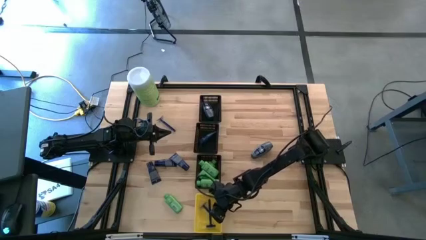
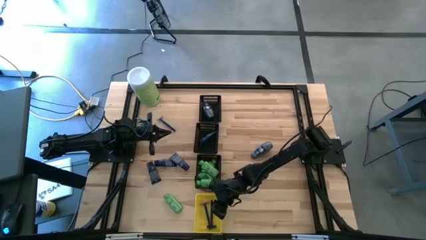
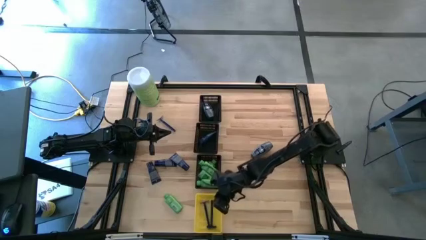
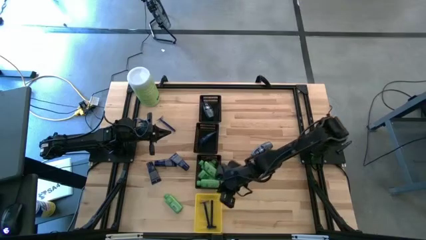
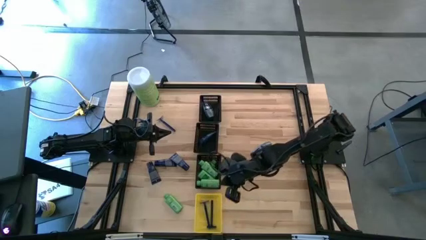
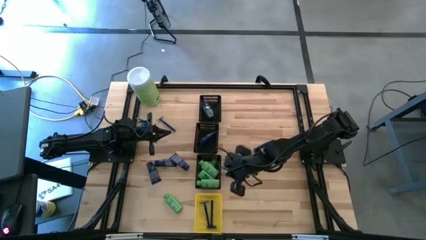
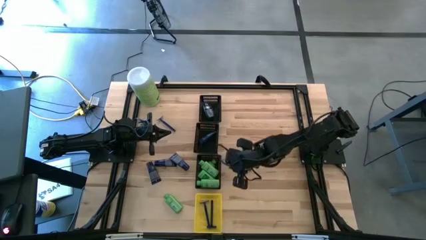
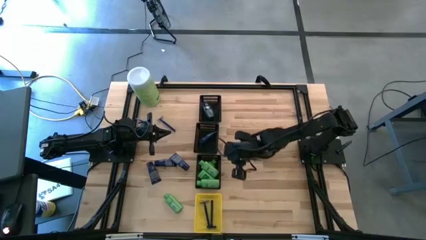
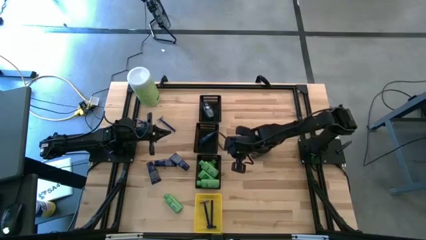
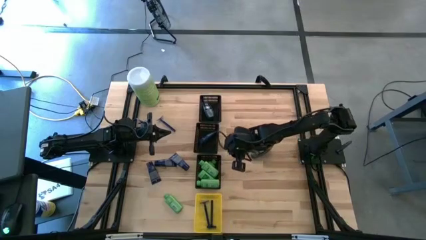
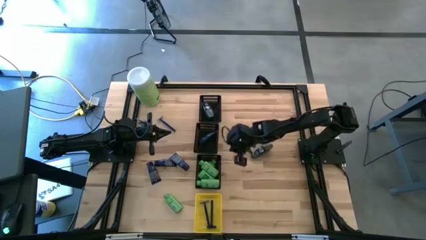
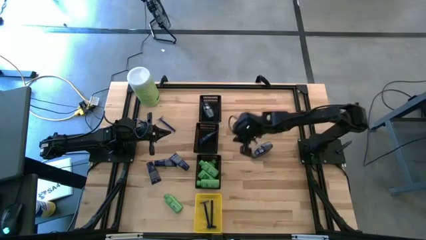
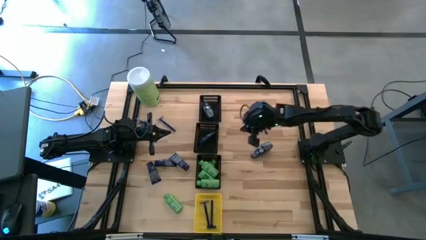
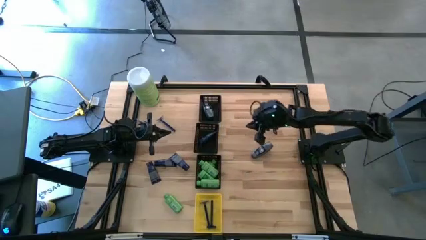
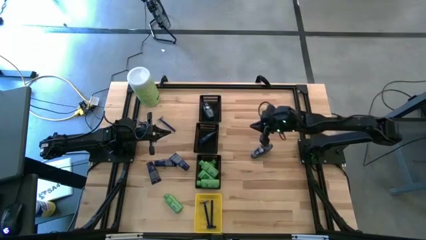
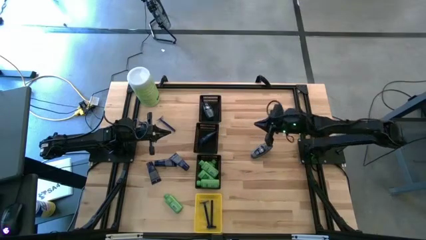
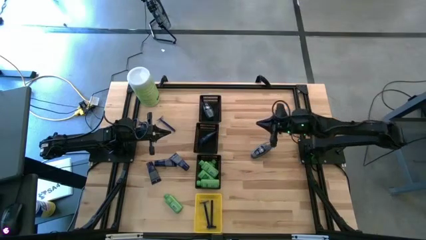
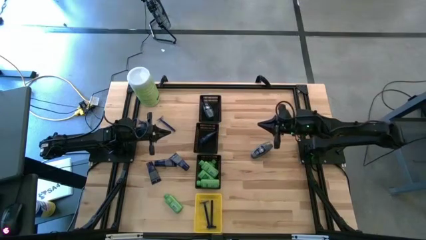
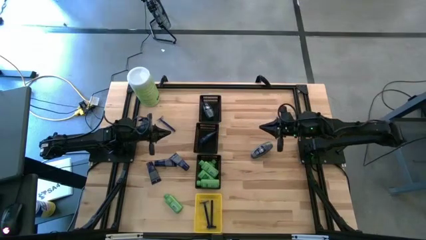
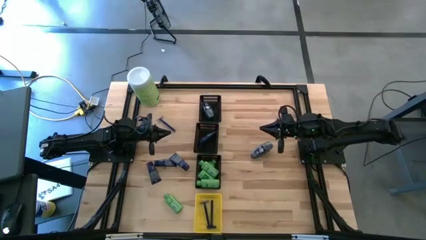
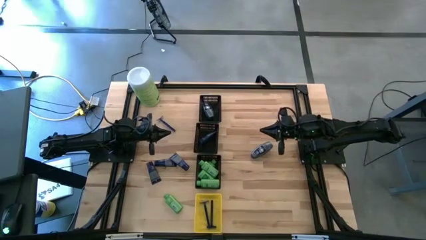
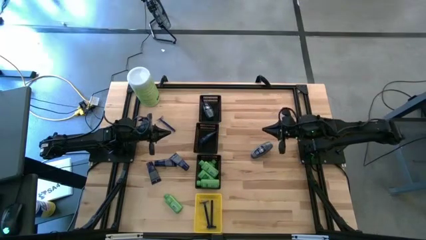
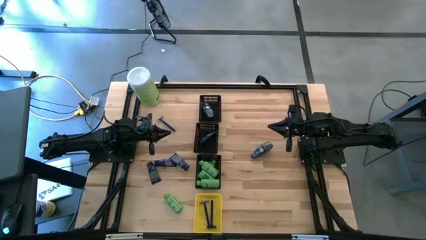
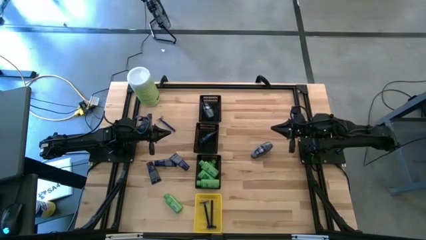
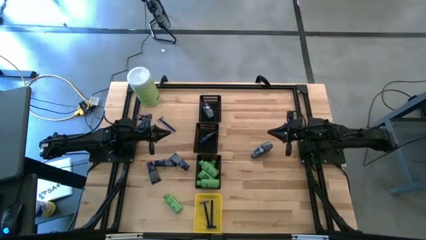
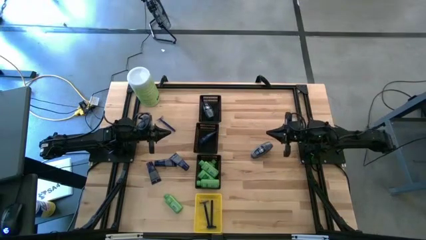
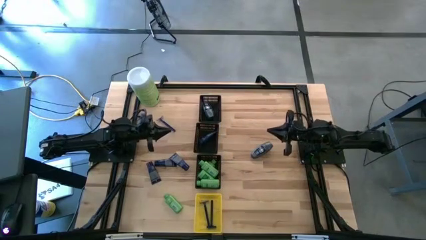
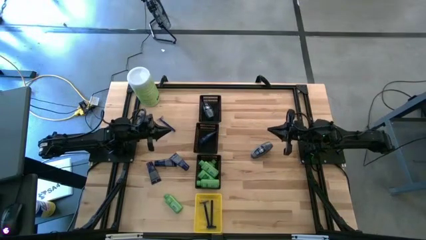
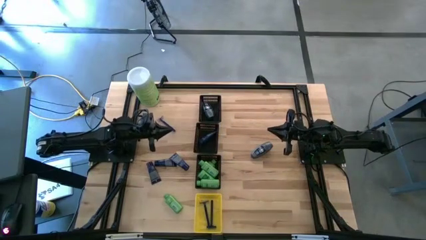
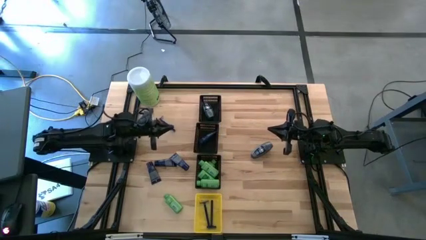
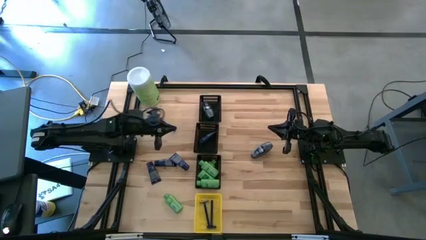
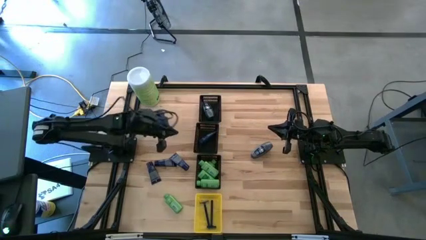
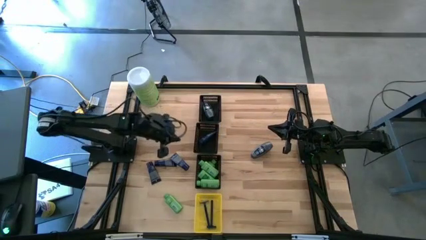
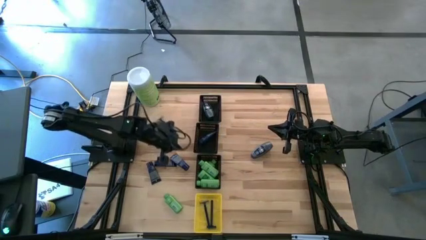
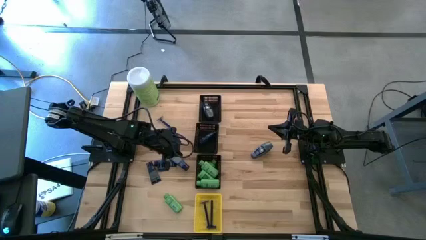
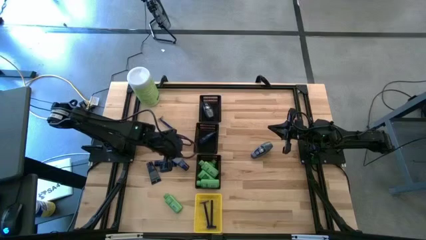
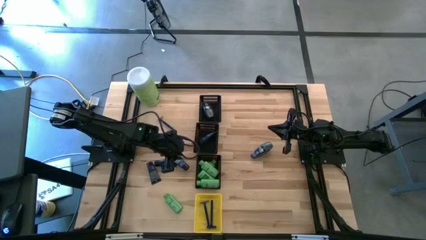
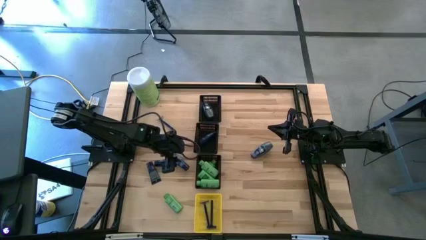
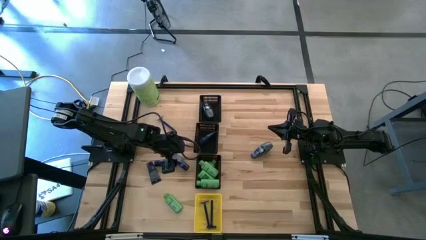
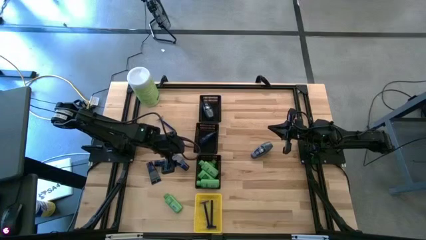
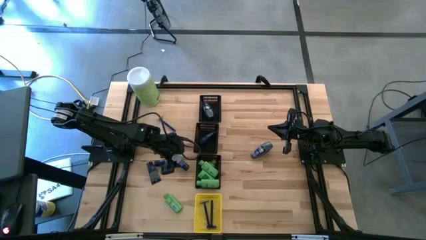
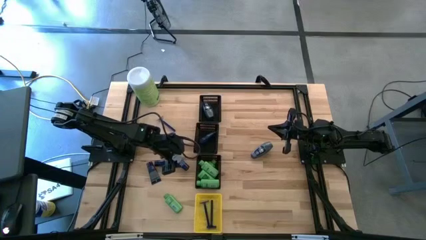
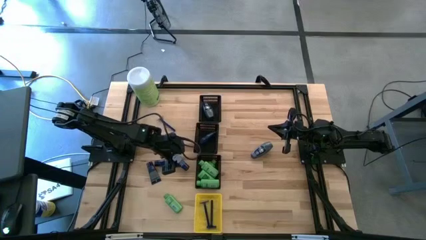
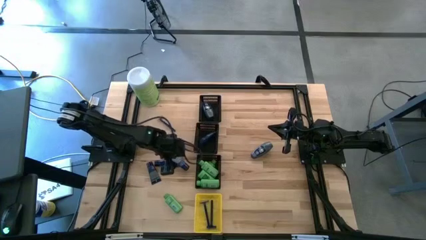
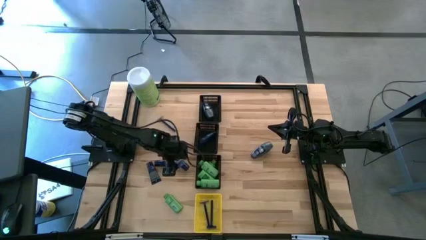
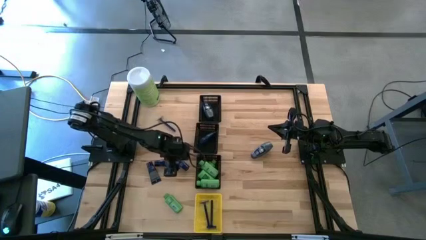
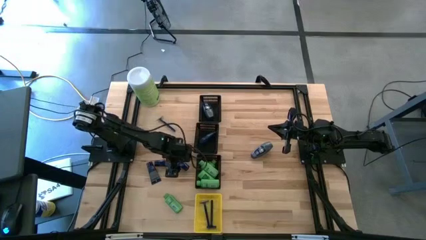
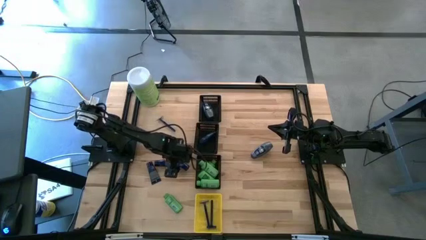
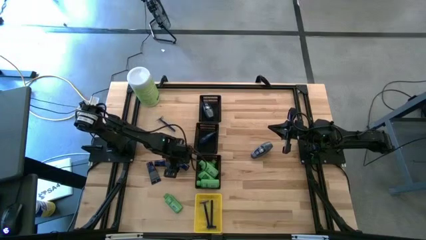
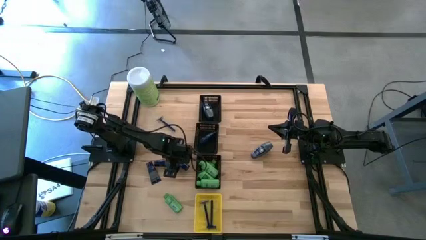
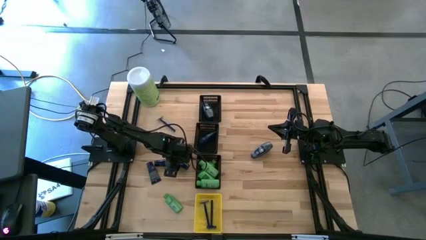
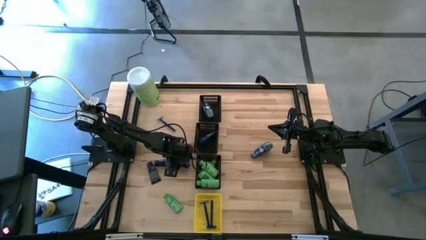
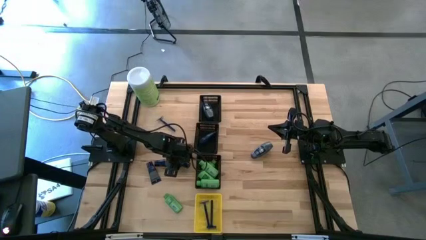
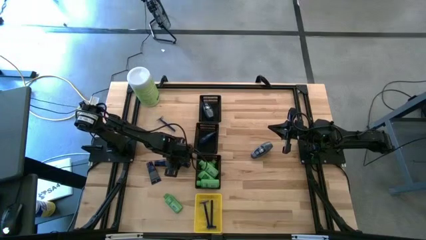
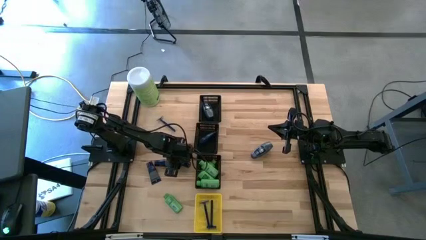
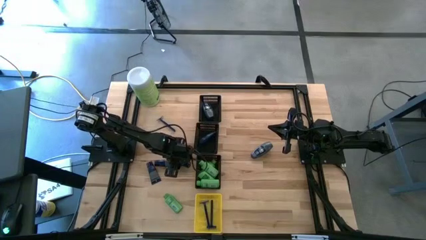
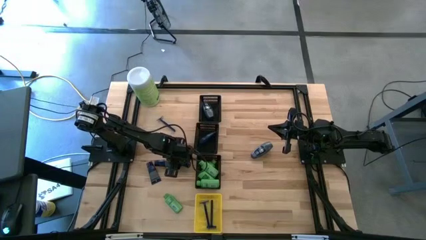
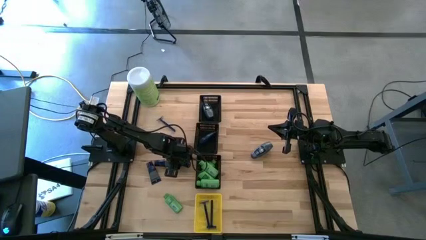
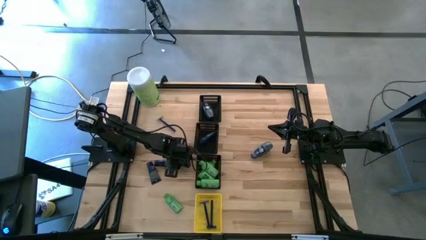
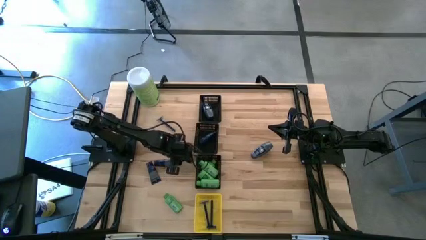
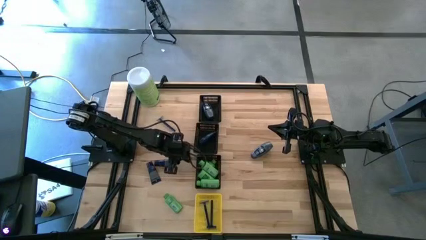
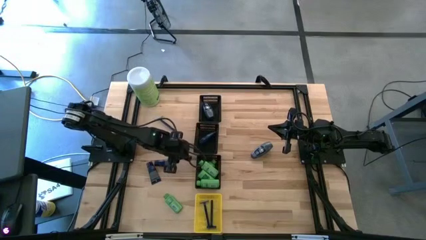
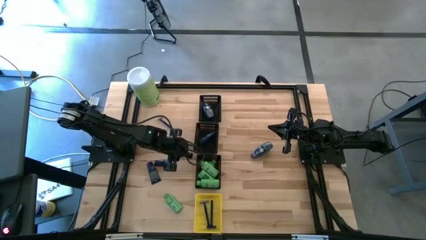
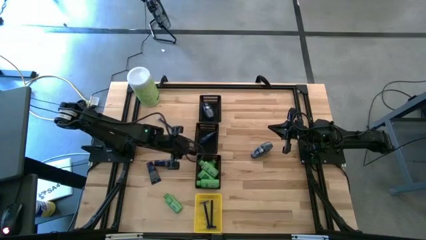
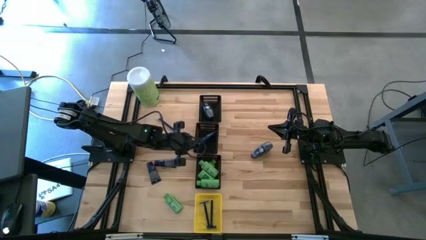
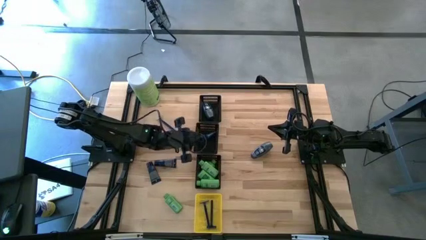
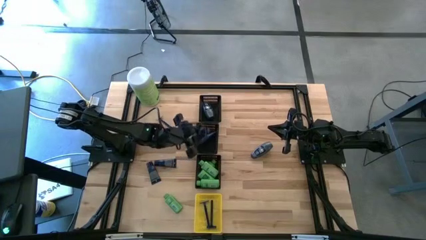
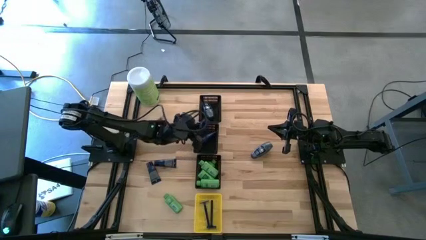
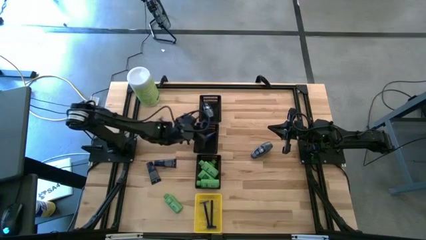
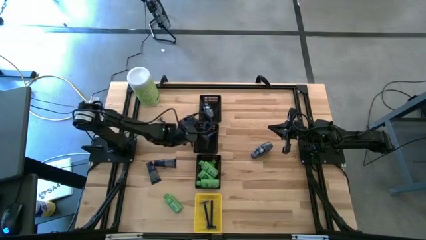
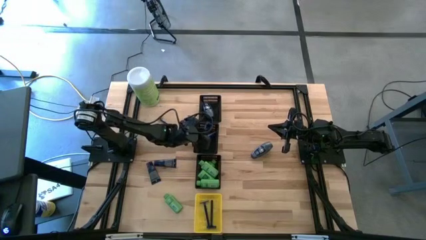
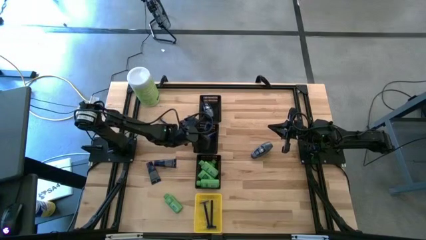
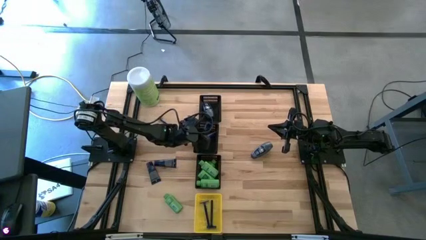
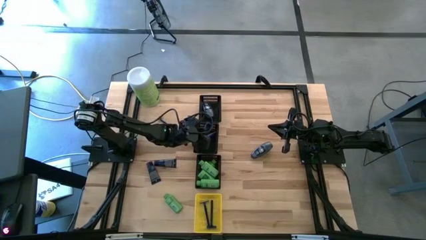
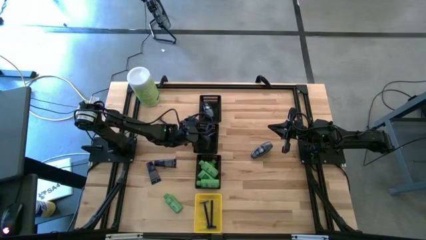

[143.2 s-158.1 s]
Task: Pick & Place Travel size toiletries
Put the dark blue shave butter bottle into the center black bin
